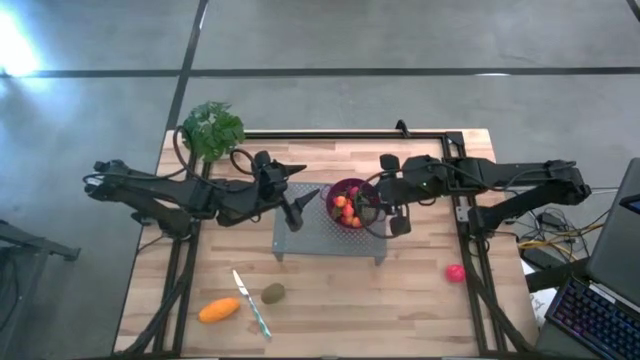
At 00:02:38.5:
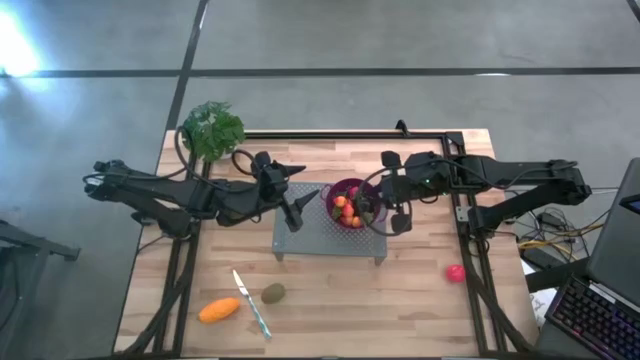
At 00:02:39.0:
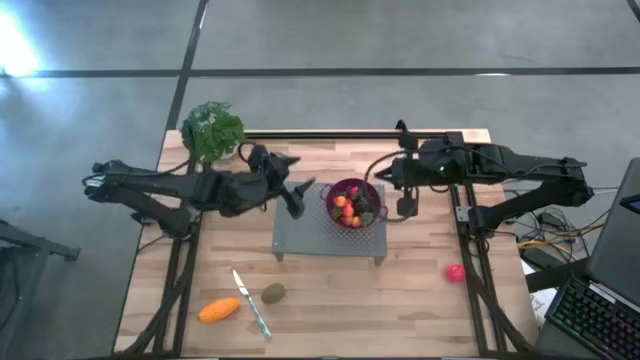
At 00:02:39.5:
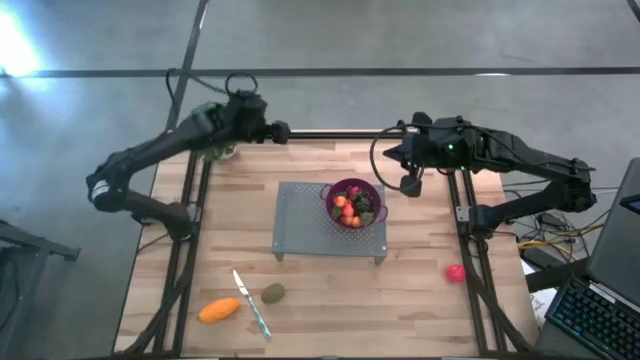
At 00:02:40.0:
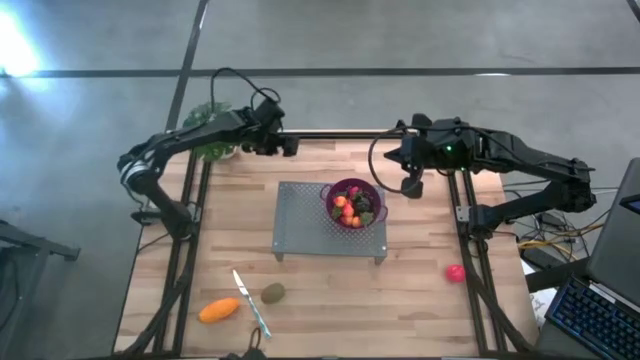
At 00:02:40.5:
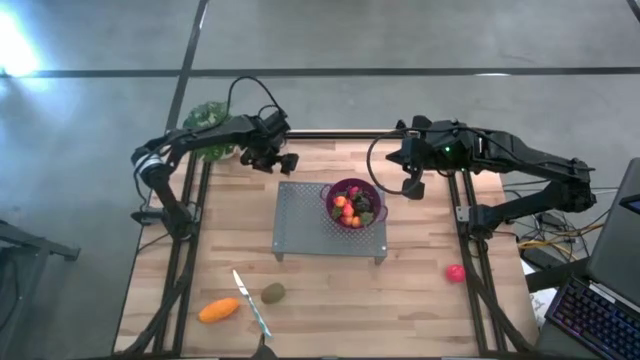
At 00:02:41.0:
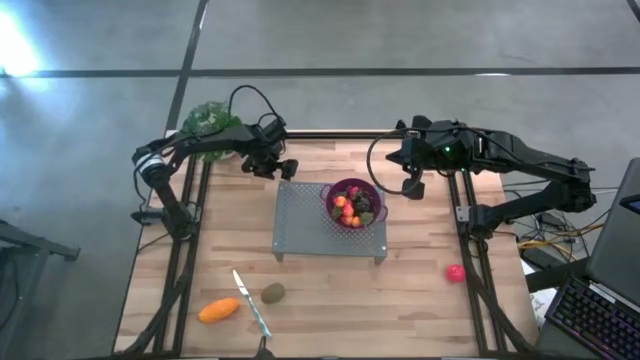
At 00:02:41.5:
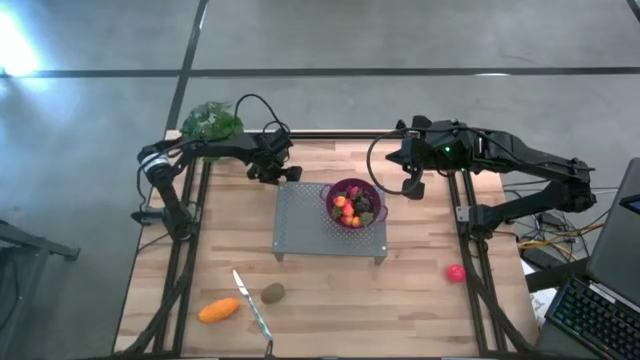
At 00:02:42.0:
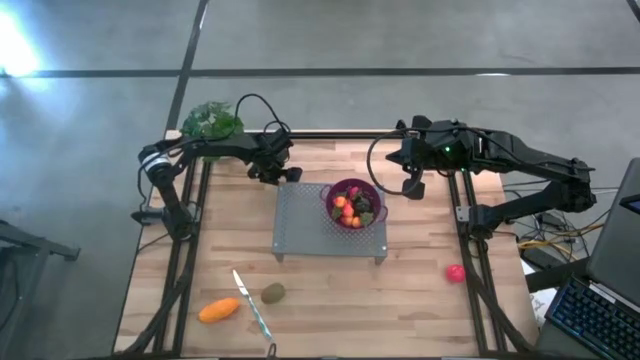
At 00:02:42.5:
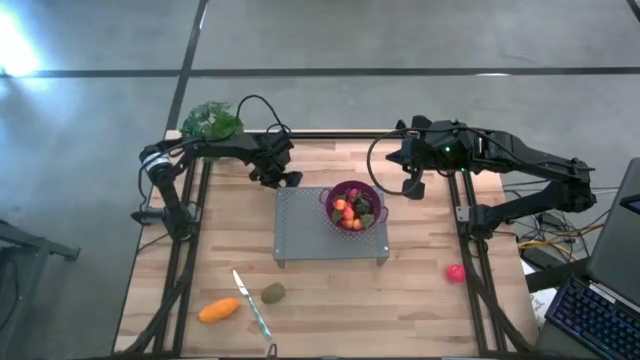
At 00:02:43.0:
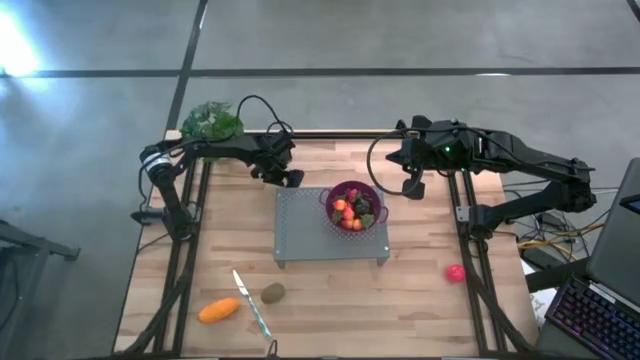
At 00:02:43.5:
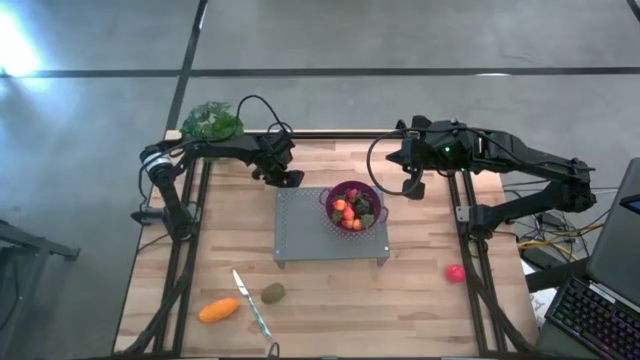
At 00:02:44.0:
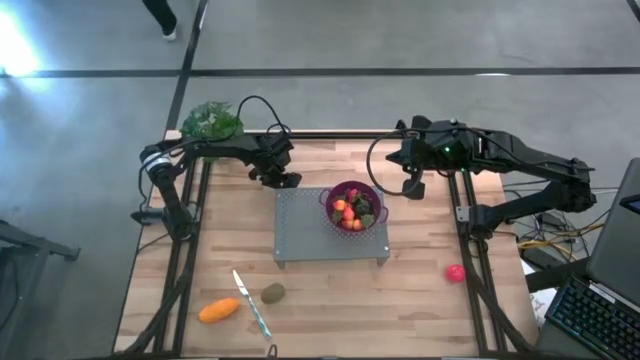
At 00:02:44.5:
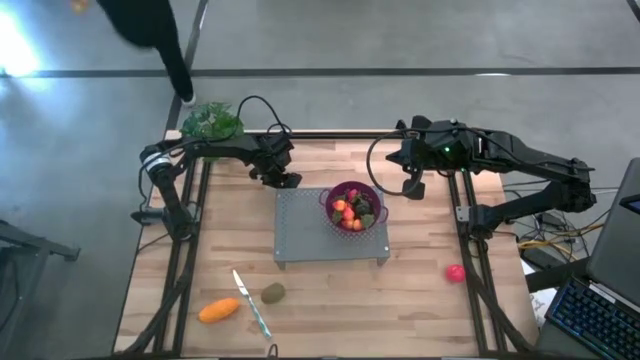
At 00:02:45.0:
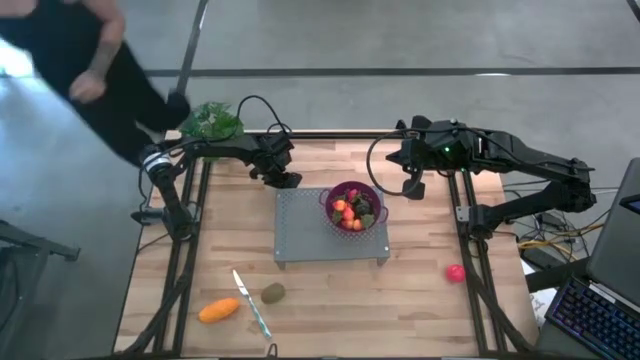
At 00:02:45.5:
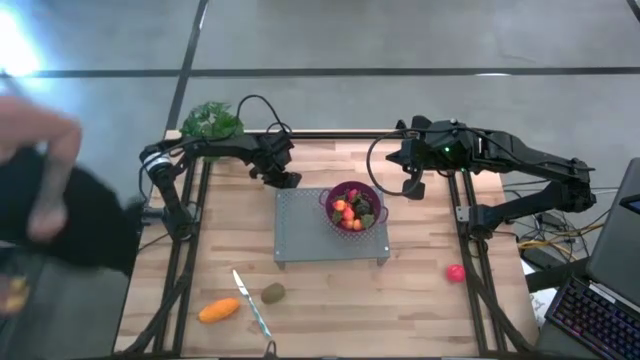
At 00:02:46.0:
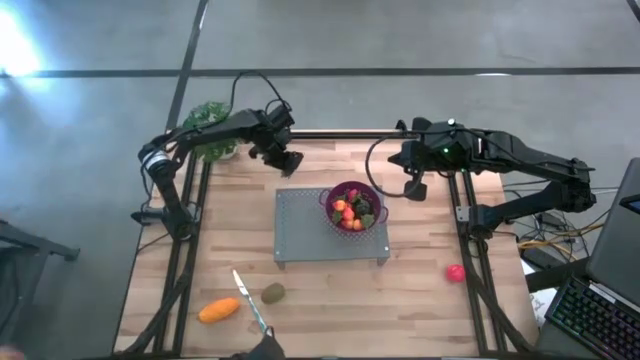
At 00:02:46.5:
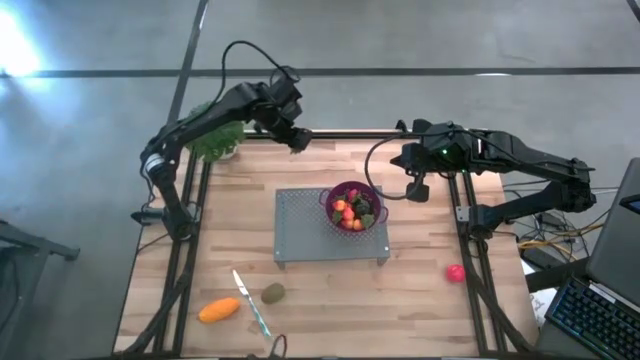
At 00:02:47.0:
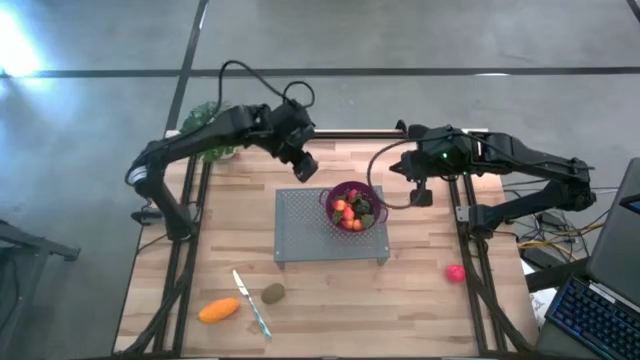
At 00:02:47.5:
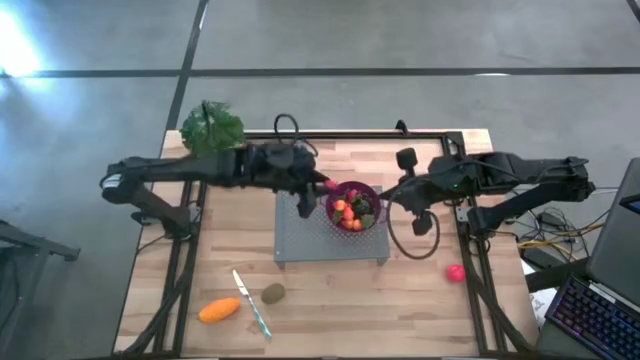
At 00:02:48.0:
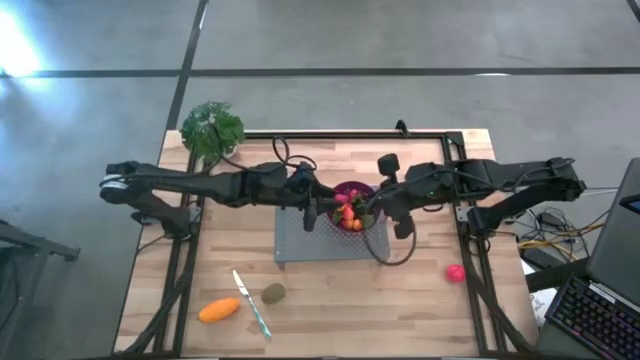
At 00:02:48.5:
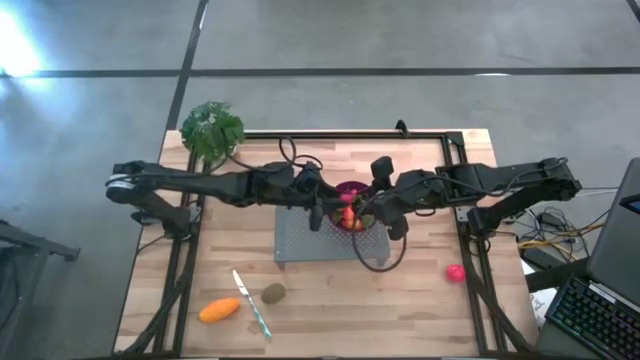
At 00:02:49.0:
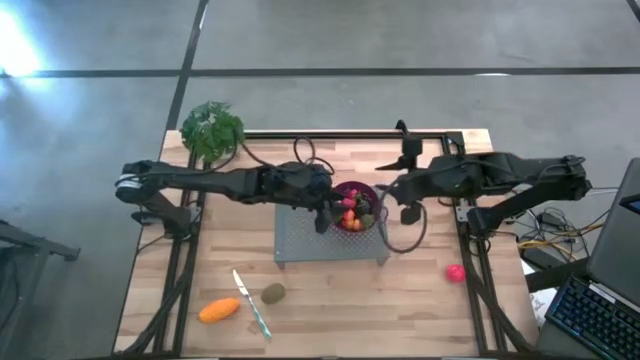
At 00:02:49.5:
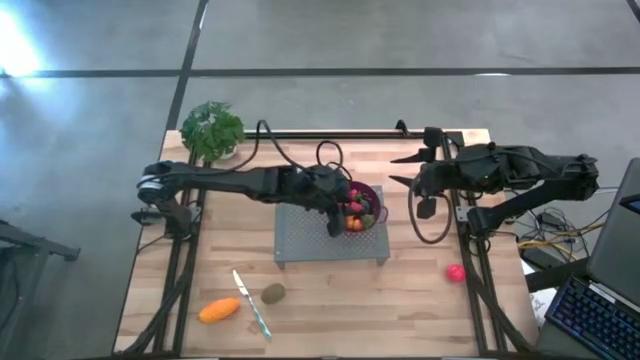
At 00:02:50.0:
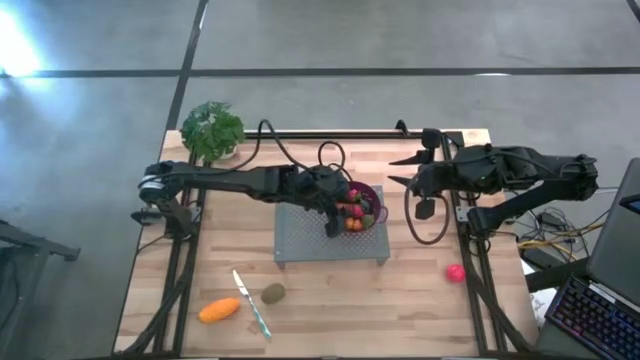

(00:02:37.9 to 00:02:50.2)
Task: Pick & Place Fruit
Put the strawberry in the purple strainer bowl on the shelf

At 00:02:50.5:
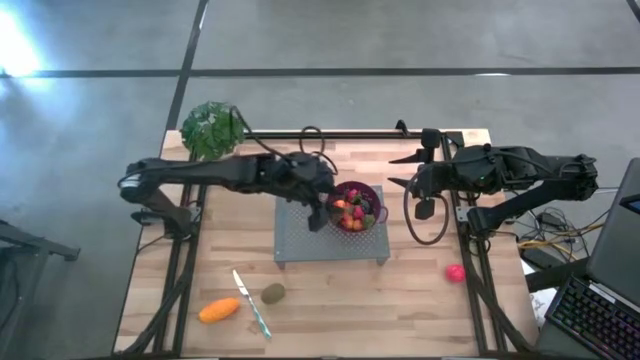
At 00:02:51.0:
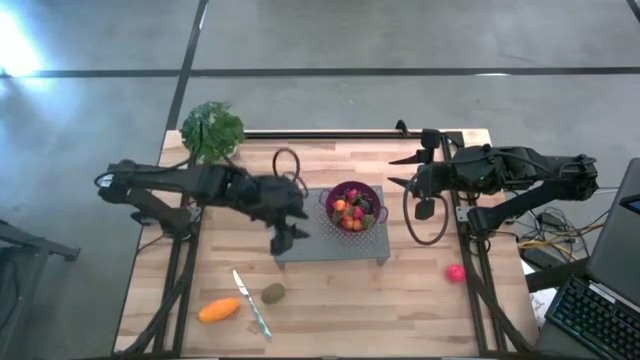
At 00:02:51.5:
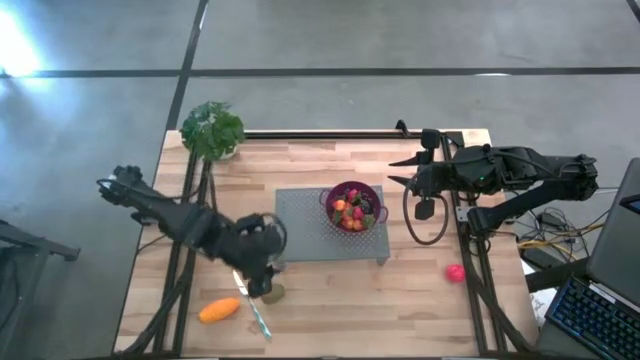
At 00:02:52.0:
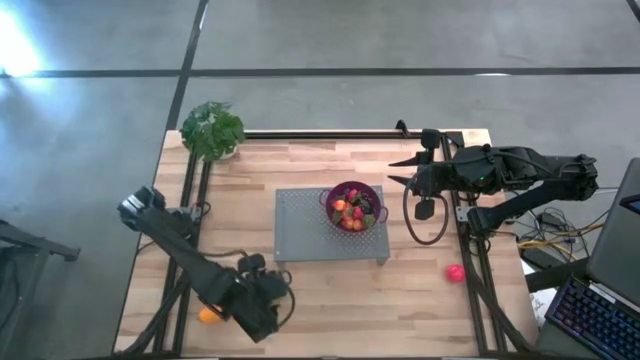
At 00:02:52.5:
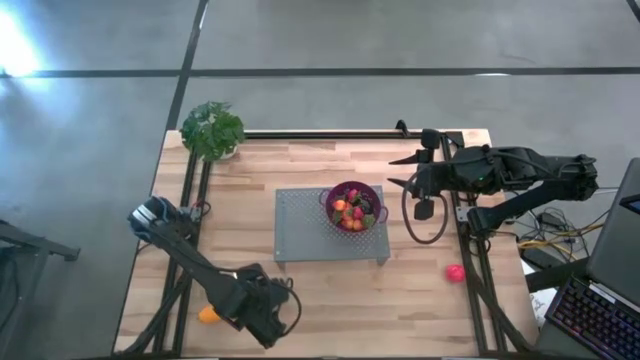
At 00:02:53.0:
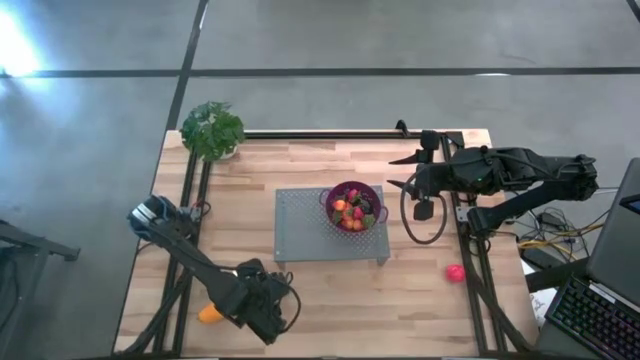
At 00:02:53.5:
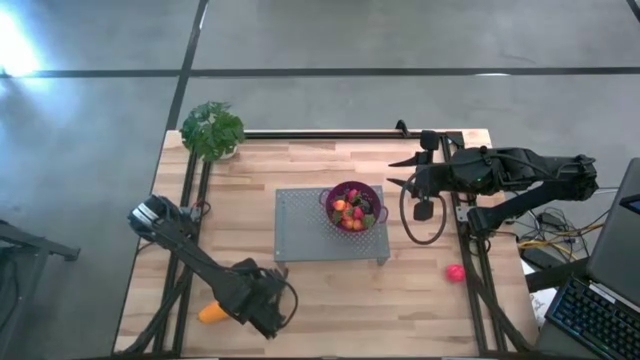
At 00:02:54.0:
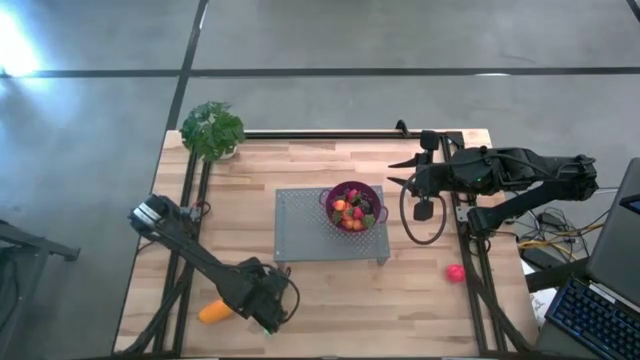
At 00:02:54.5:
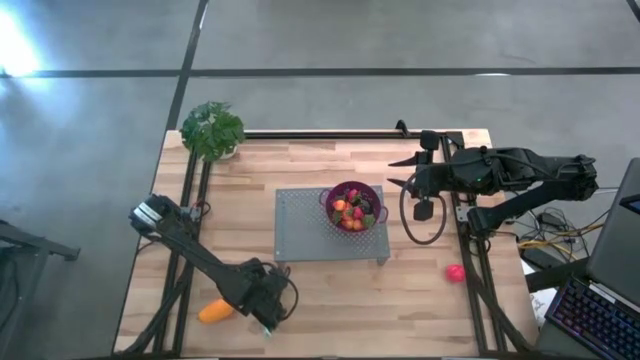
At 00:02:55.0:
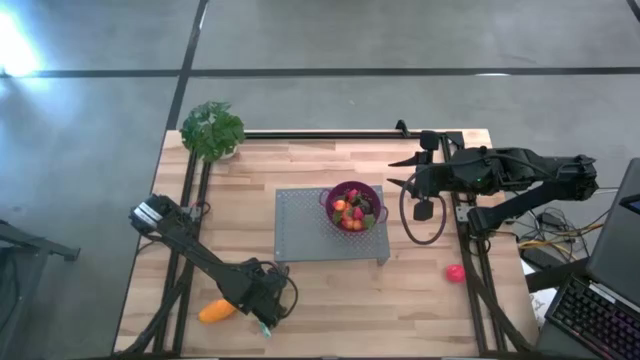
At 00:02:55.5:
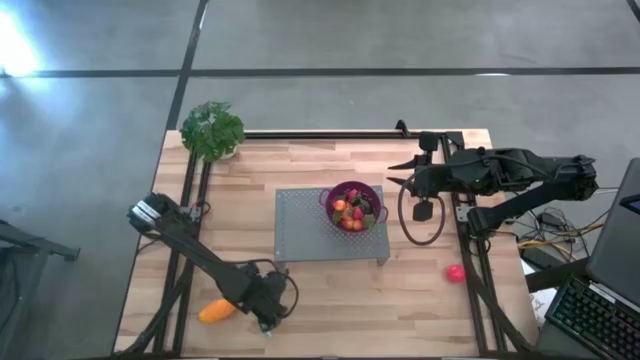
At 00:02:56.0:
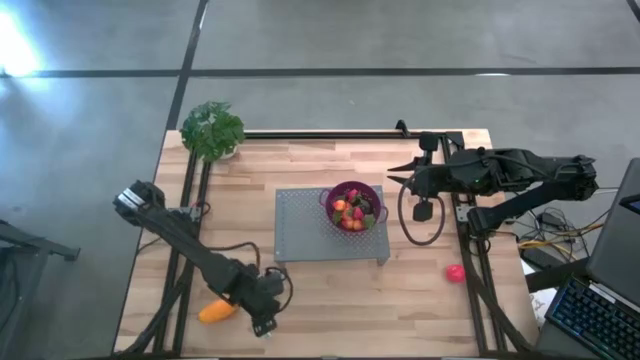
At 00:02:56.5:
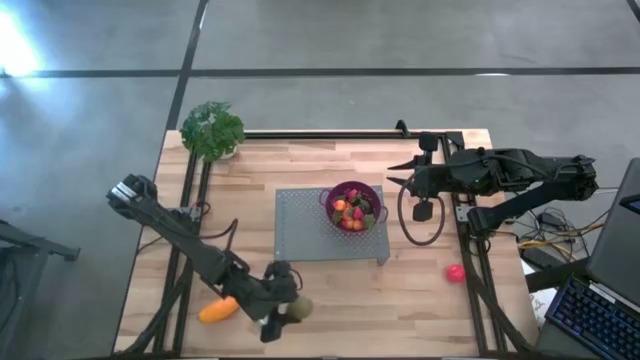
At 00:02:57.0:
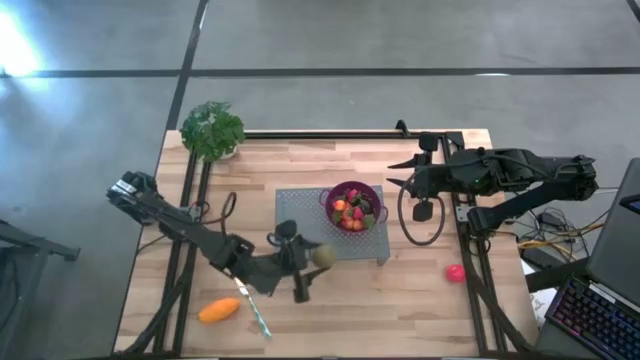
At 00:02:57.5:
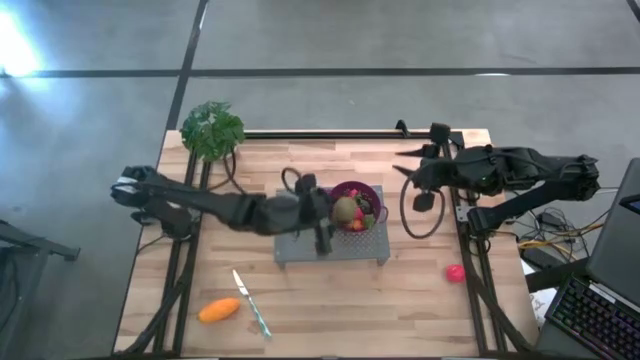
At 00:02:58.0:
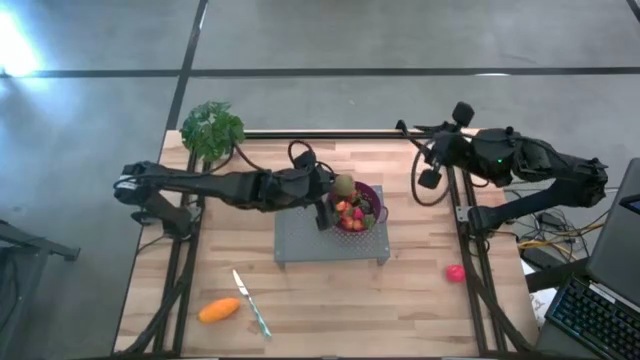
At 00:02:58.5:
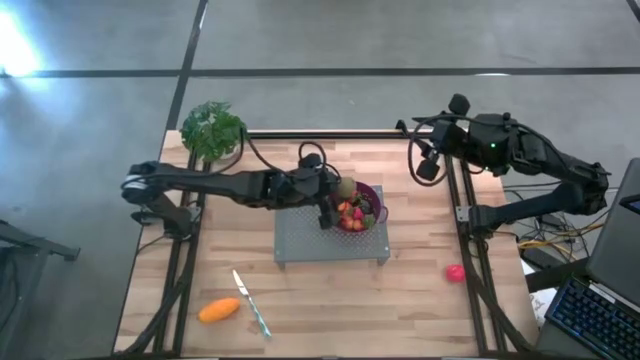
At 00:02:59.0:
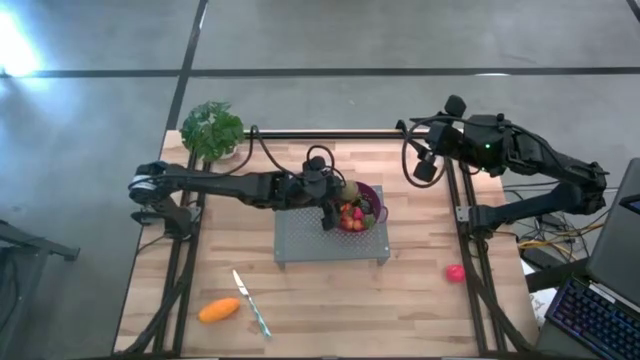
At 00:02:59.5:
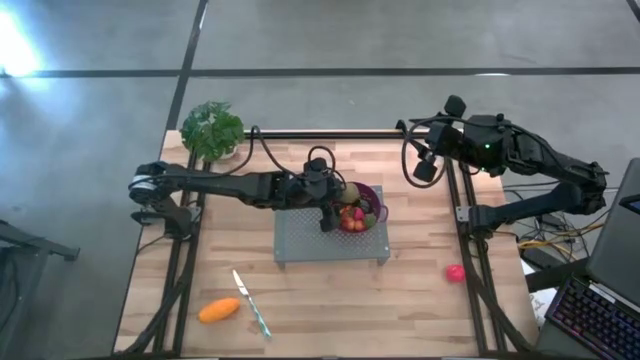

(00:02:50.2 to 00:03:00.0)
Put the kiwi in the purple strainer bowl on the shelf
